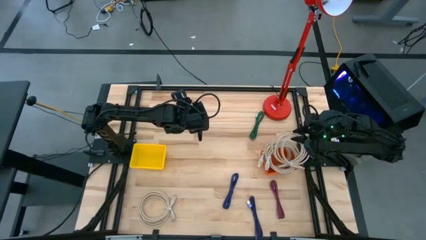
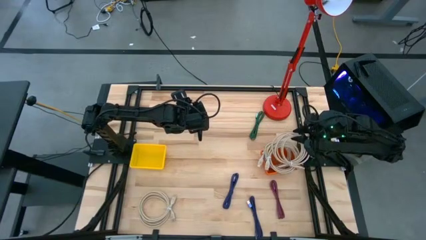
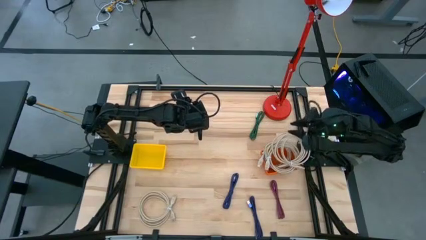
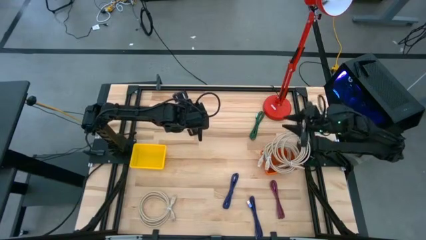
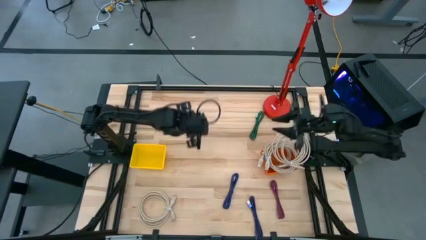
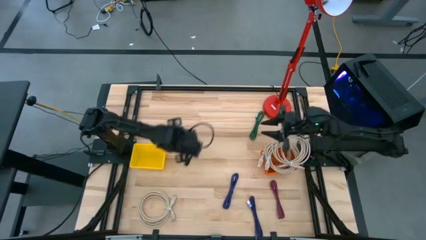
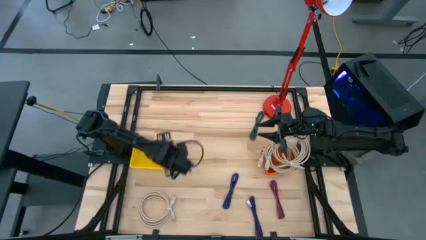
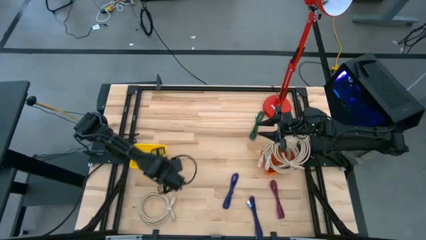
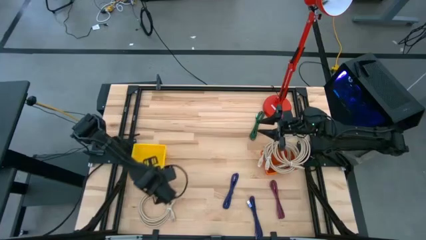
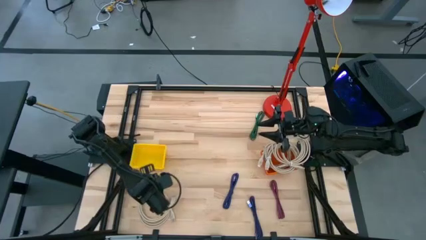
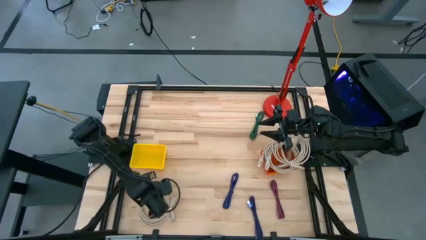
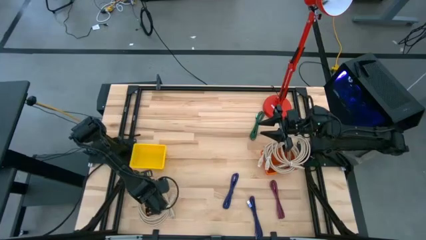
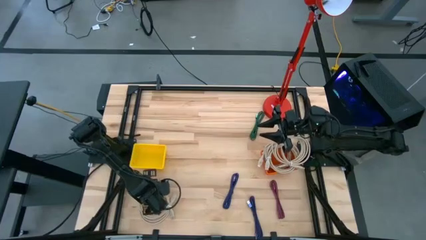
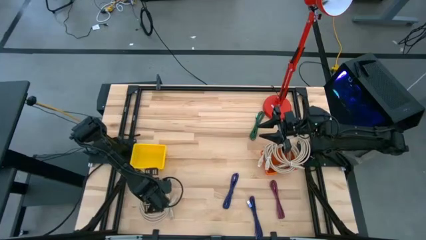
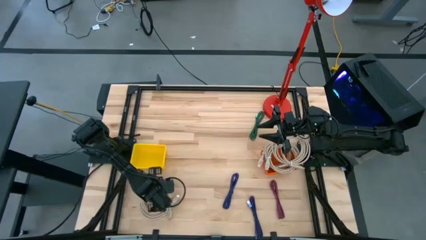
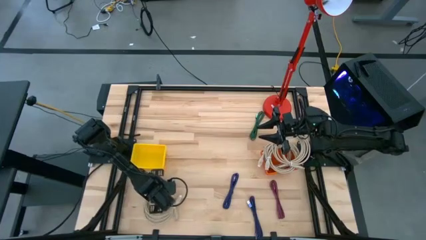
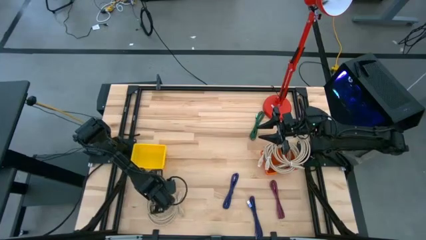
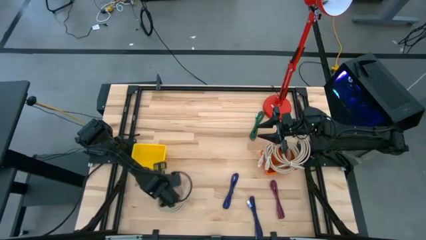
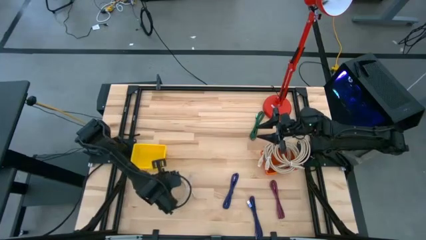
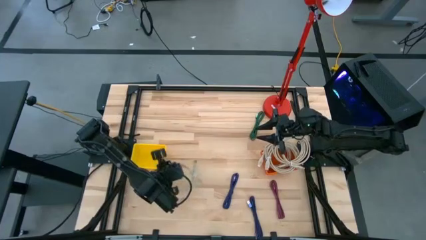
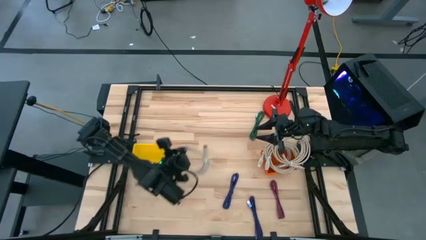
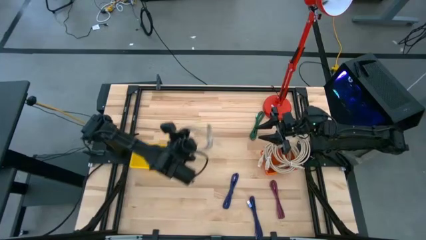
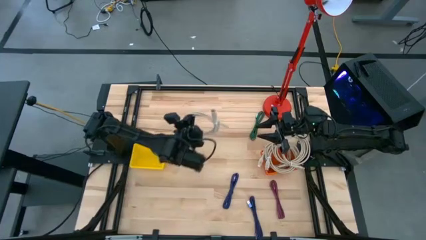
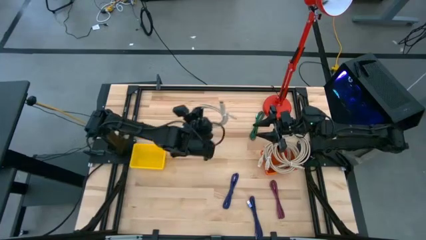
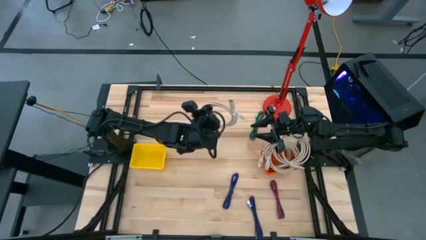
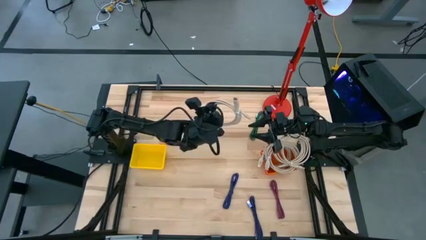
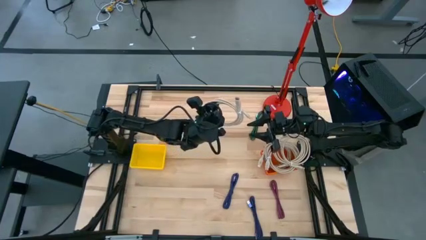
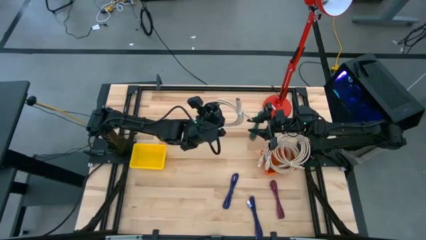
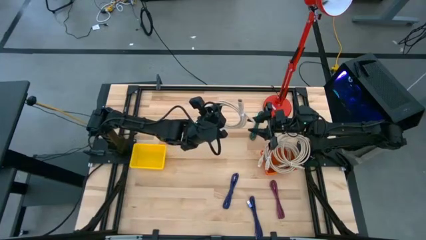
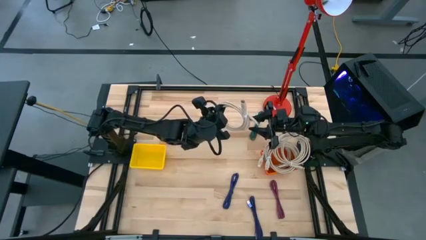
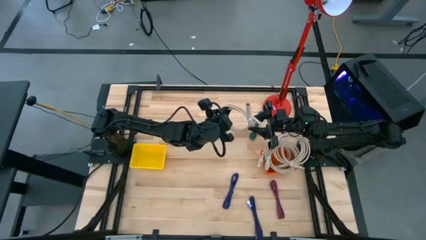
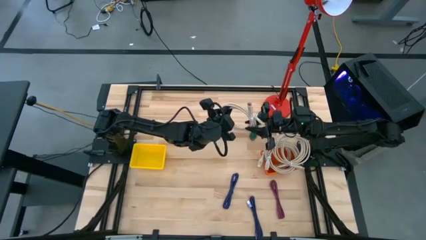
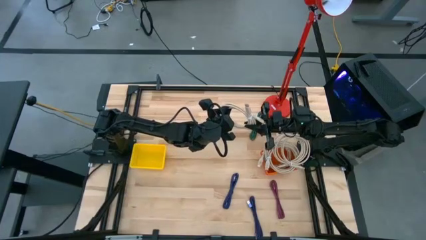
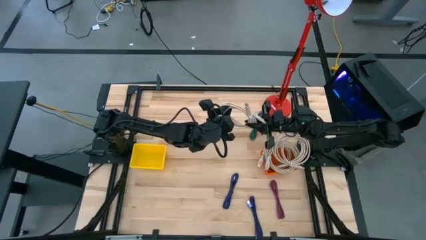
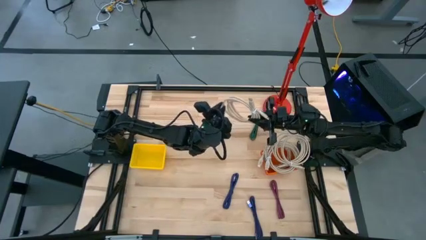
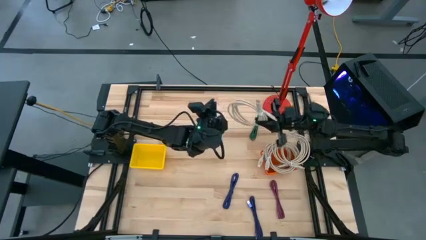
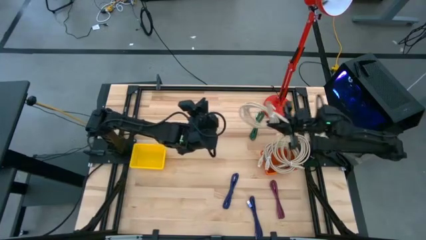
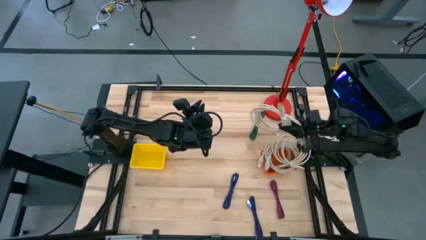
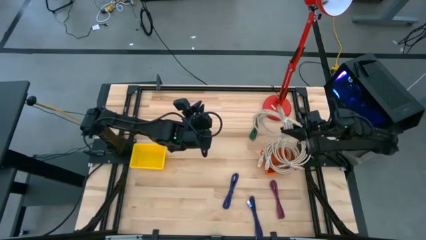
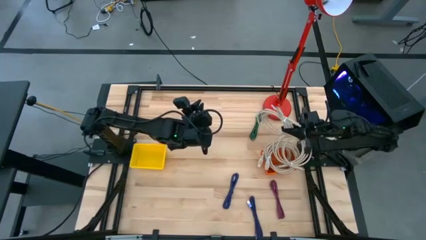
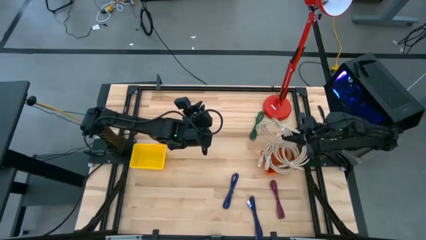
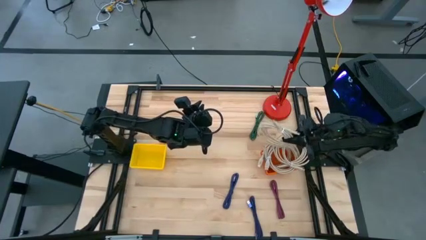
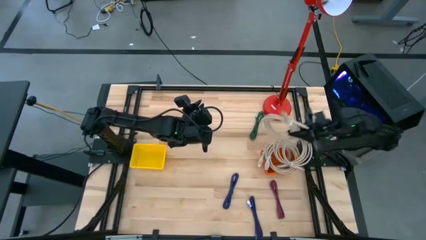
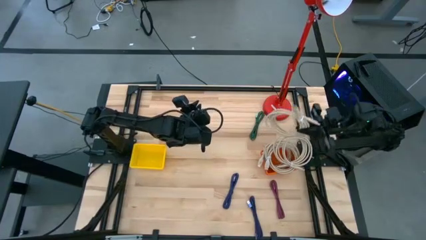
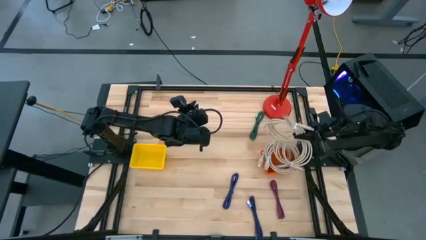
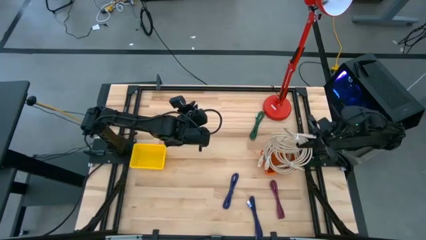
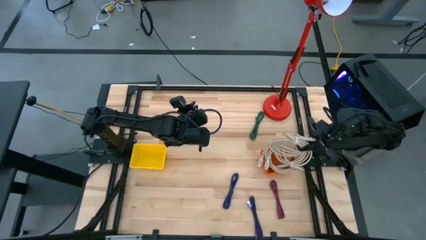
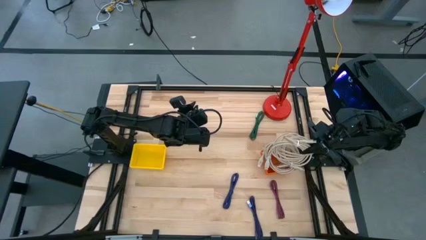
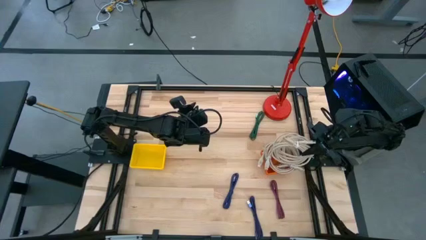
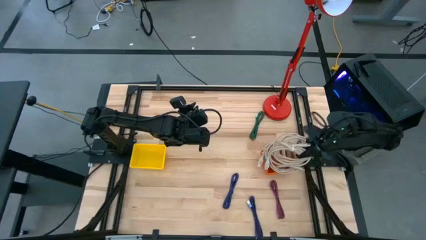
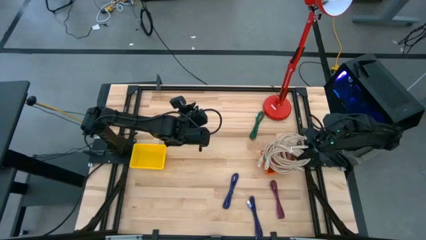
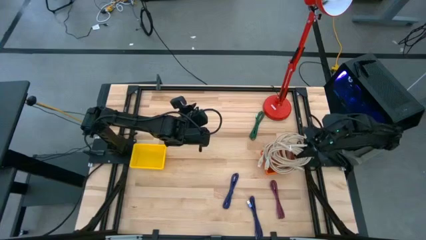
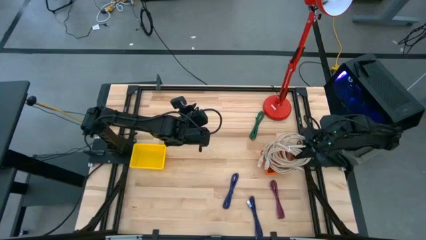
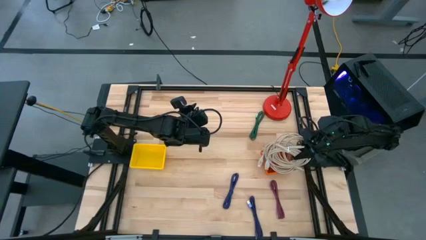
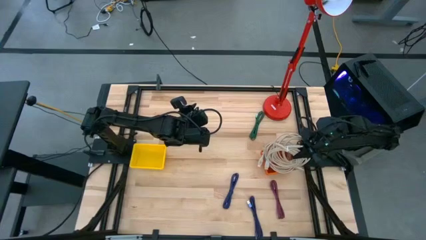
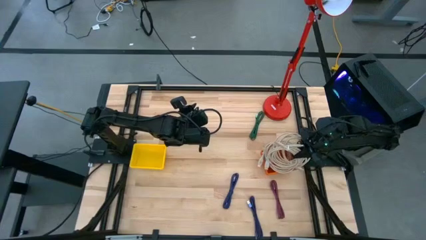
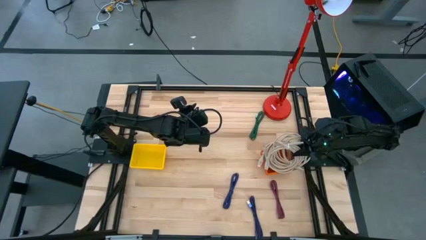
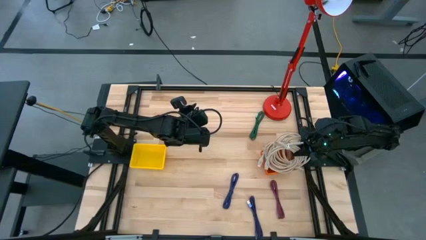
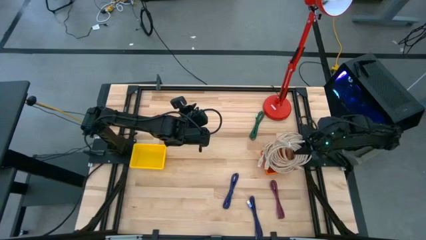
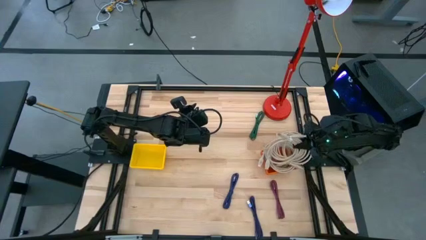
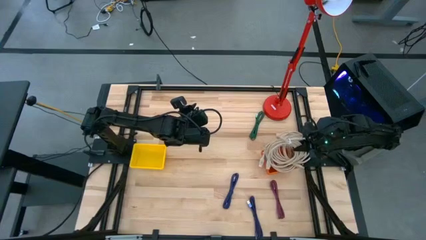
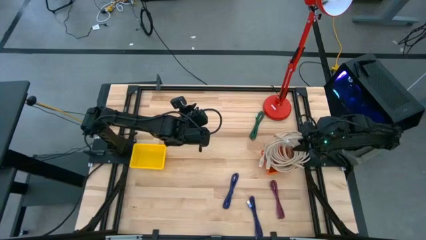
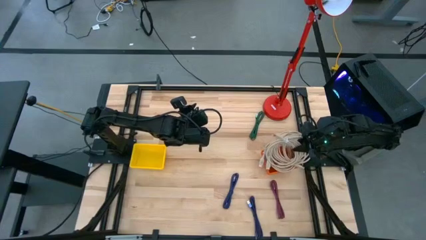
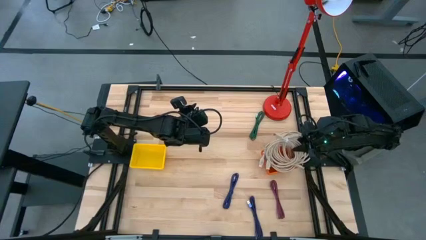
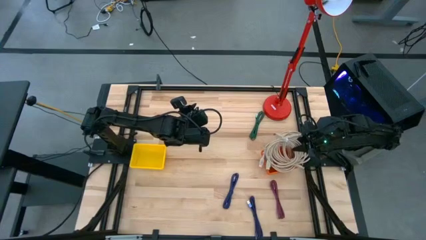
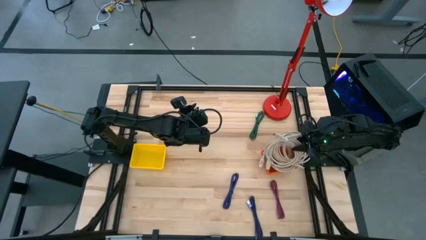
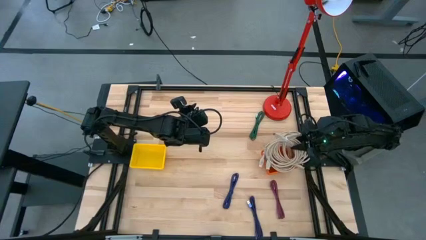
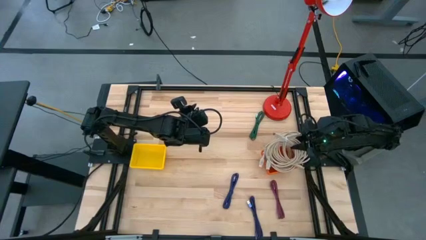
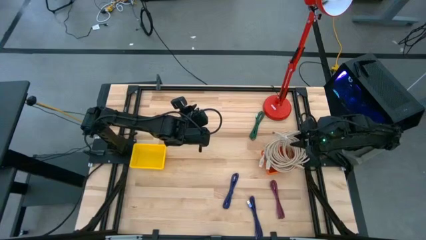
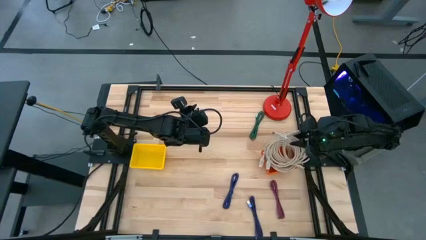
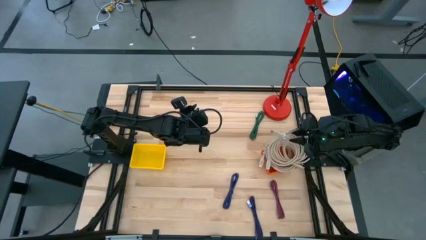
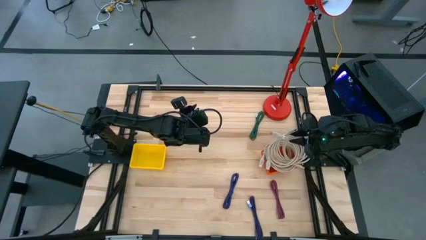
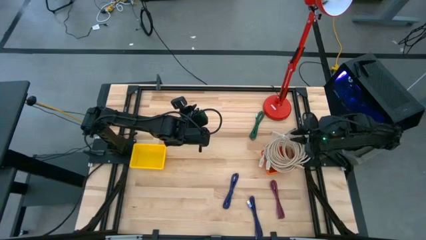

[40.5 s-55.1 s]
Task: Pick & Place USB Port
Put the brown HDMI cable into the orange bin

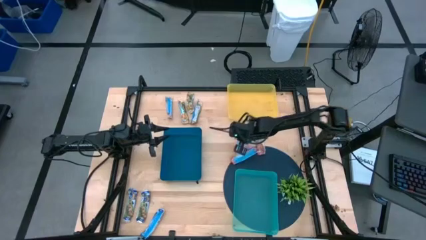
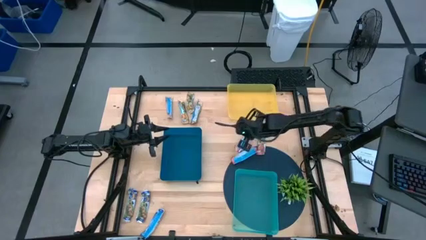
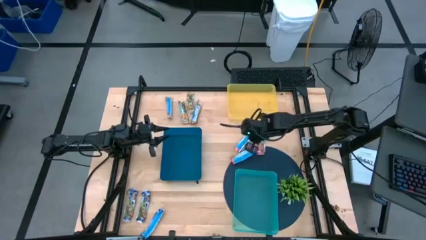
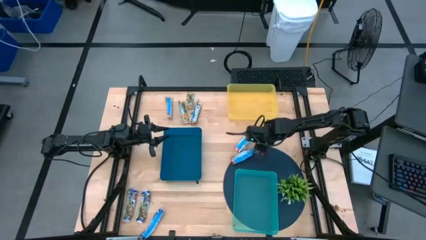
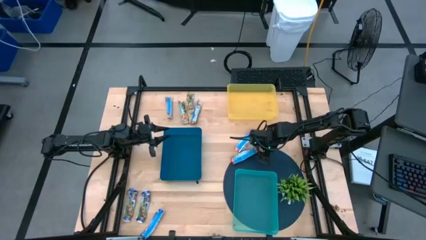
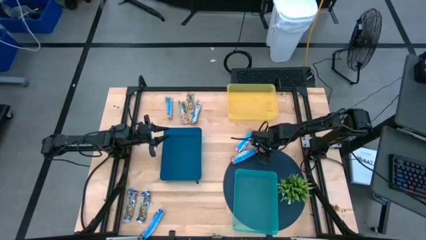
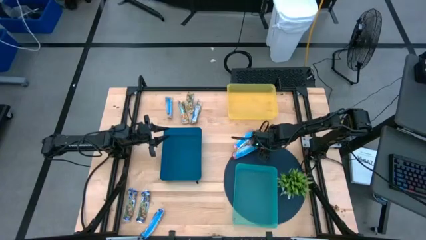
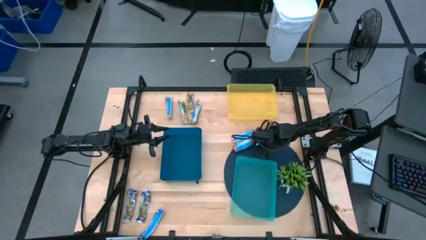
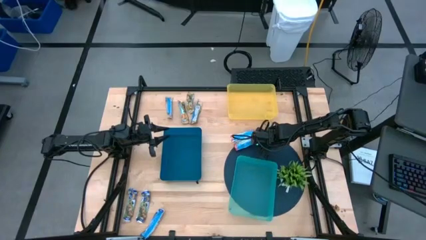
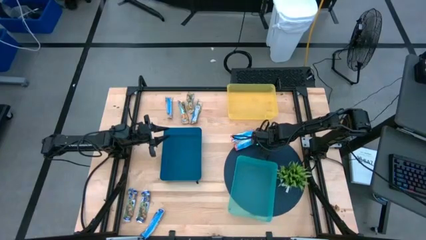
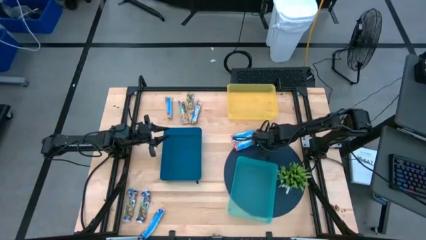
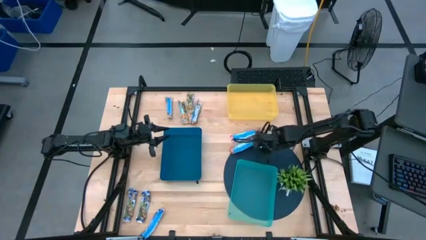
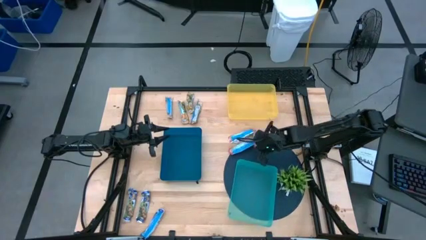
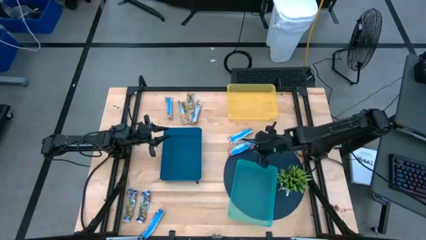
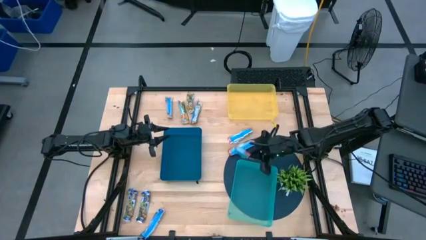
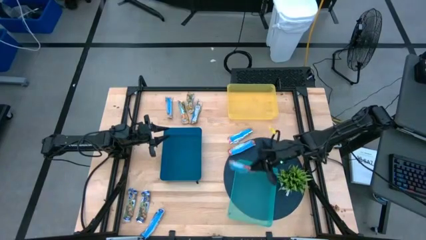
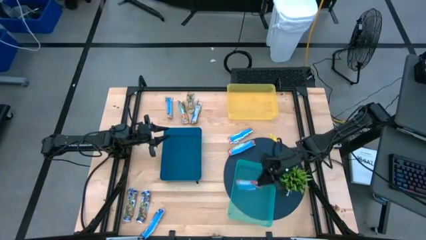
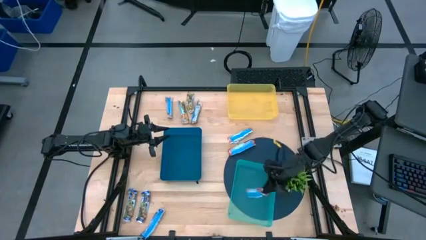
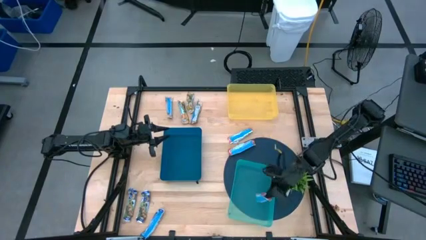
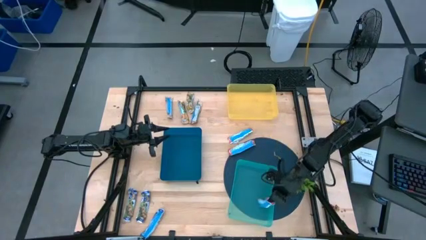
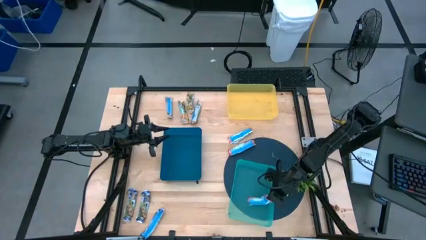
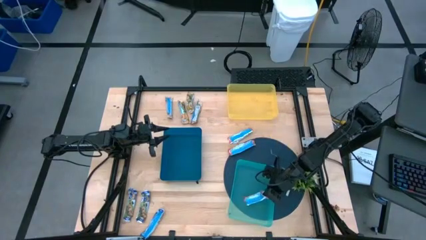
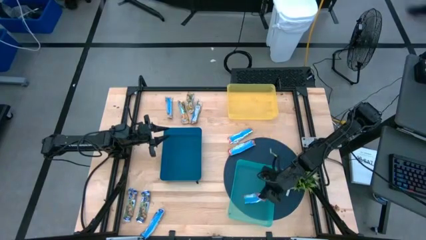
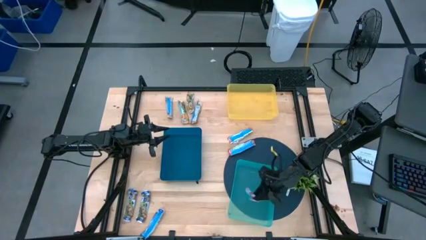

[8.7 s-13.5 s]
Task: Pick and place Granola Bars by type
Put the right red granola bar into the green bin
